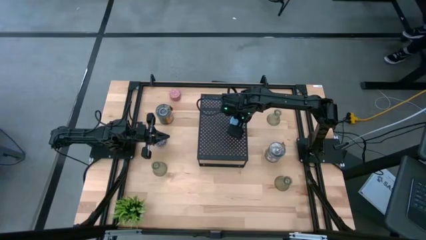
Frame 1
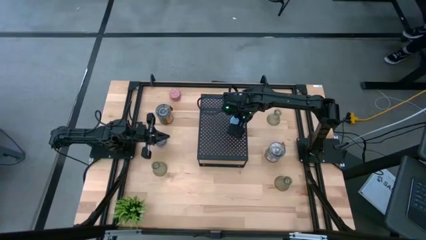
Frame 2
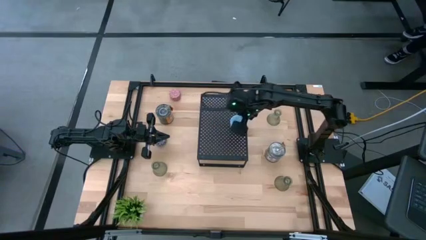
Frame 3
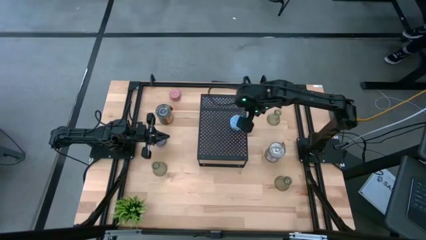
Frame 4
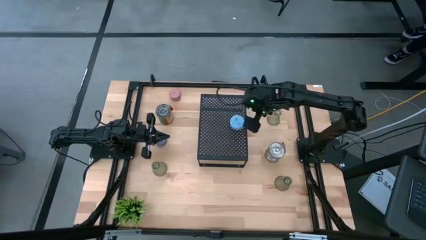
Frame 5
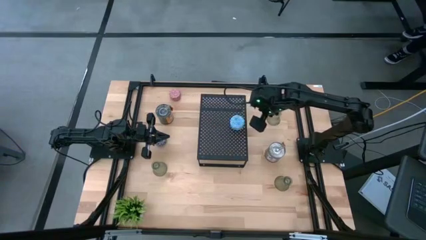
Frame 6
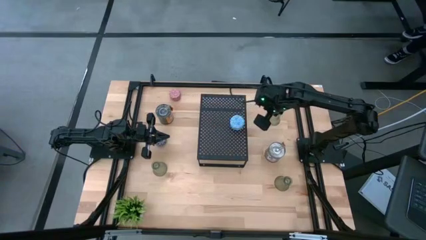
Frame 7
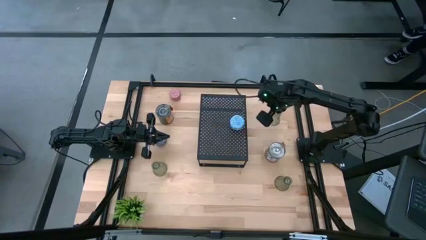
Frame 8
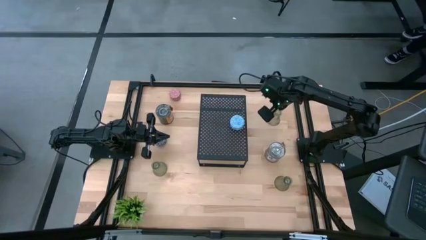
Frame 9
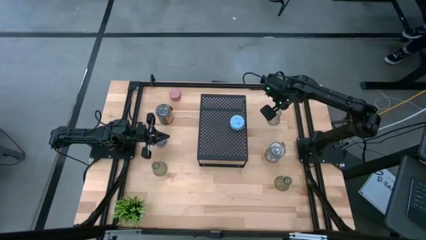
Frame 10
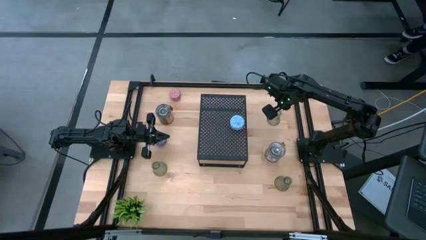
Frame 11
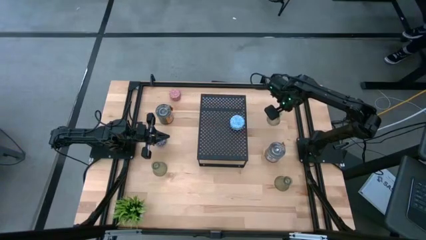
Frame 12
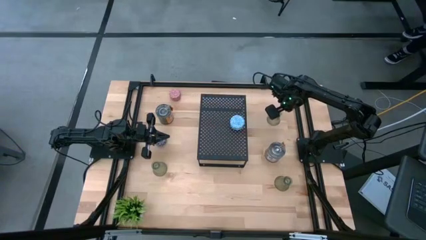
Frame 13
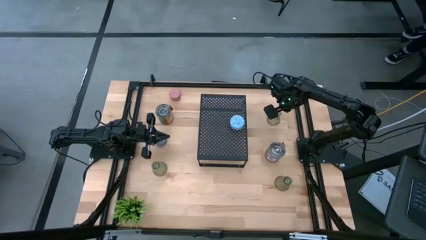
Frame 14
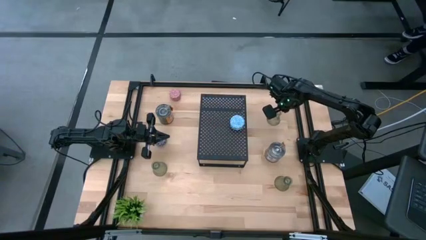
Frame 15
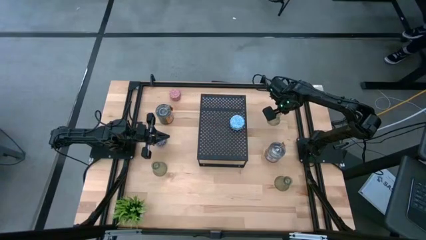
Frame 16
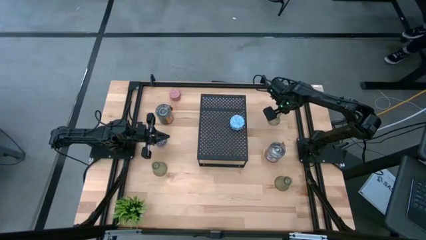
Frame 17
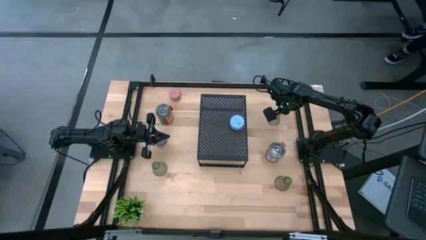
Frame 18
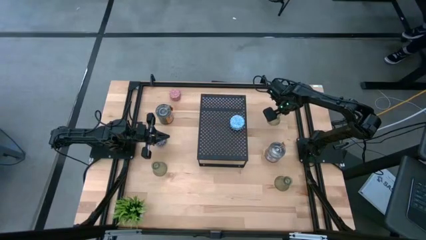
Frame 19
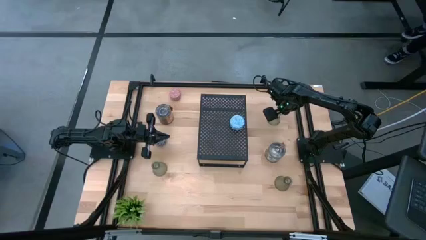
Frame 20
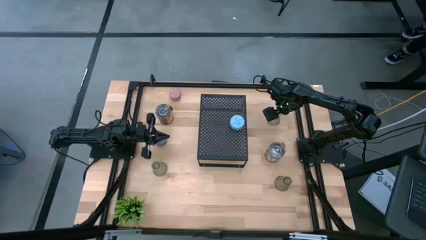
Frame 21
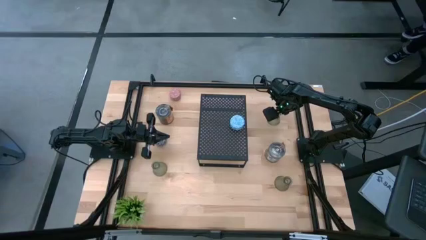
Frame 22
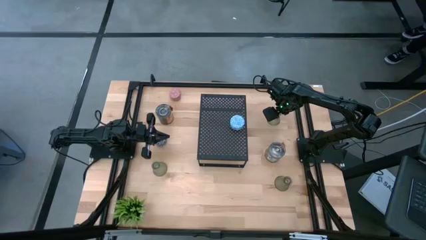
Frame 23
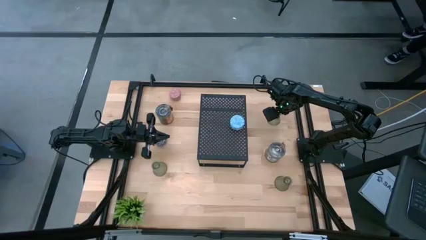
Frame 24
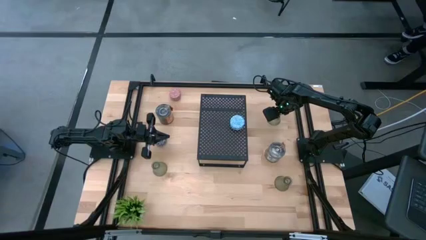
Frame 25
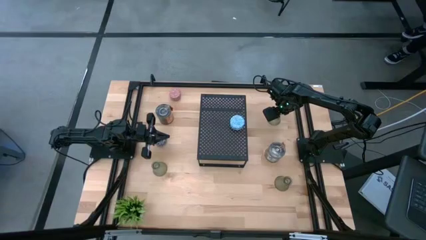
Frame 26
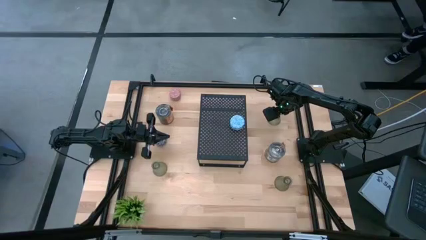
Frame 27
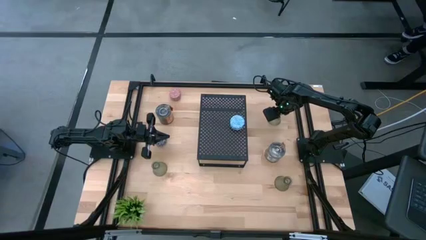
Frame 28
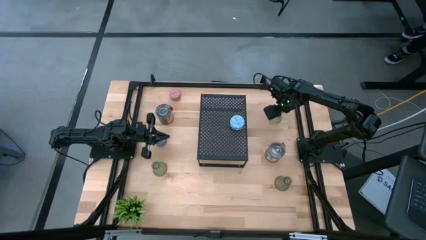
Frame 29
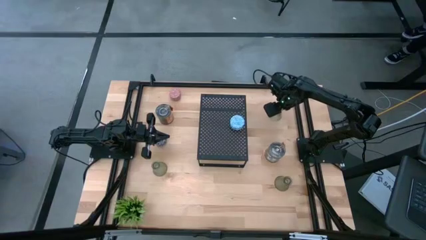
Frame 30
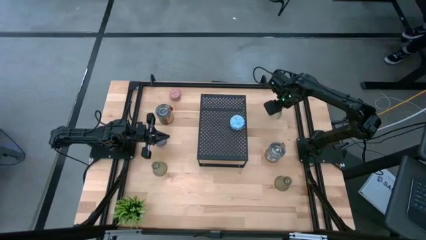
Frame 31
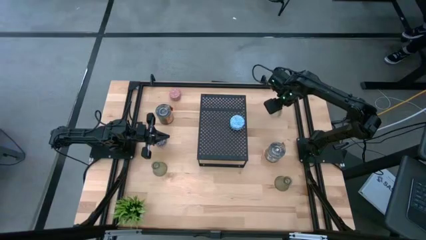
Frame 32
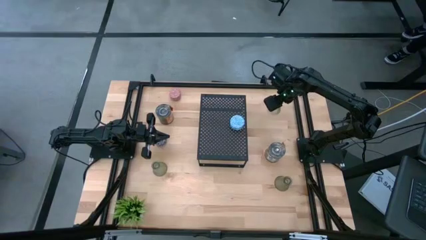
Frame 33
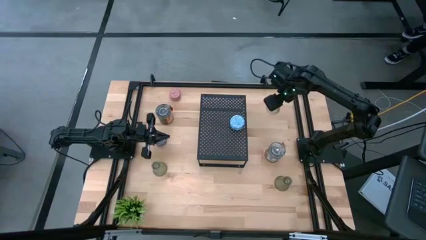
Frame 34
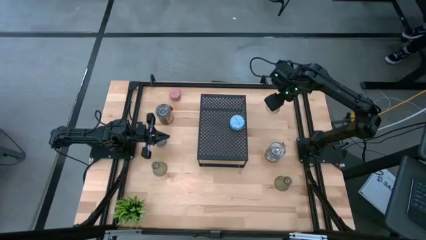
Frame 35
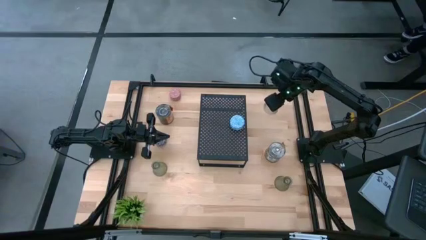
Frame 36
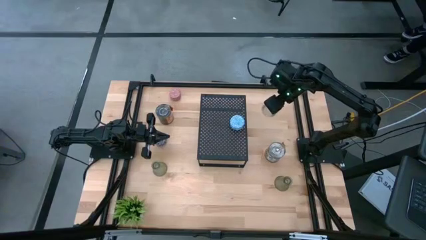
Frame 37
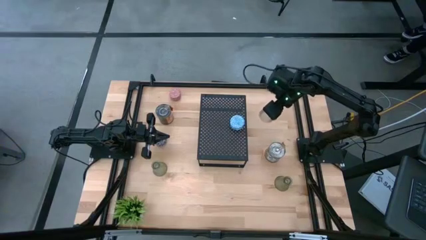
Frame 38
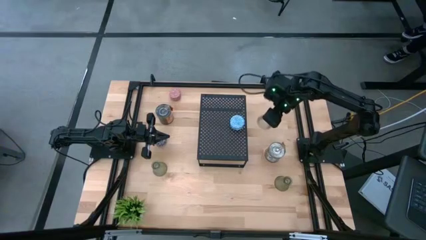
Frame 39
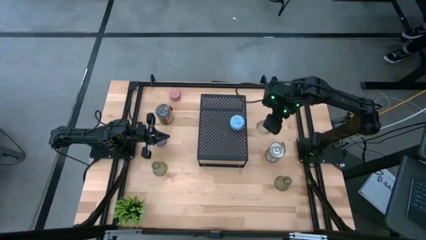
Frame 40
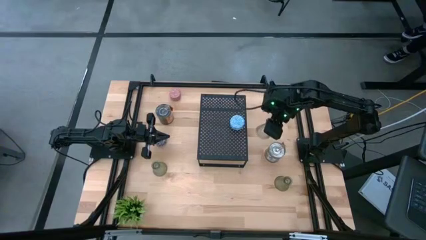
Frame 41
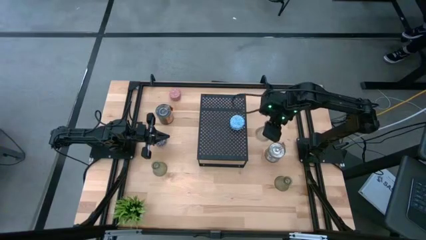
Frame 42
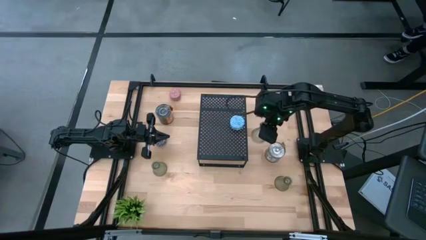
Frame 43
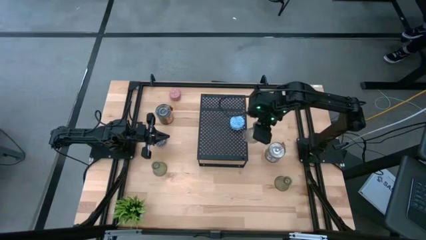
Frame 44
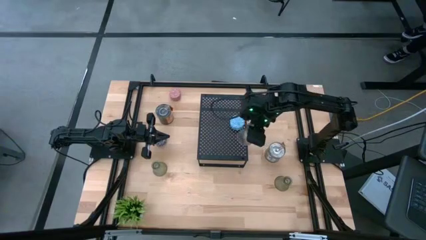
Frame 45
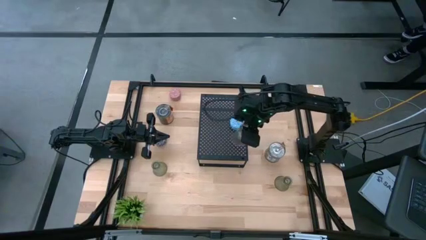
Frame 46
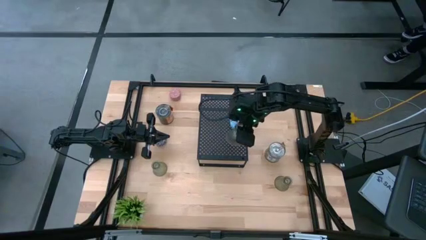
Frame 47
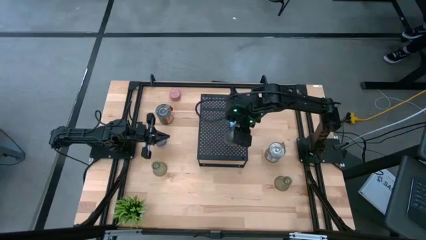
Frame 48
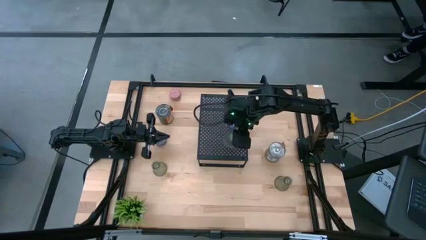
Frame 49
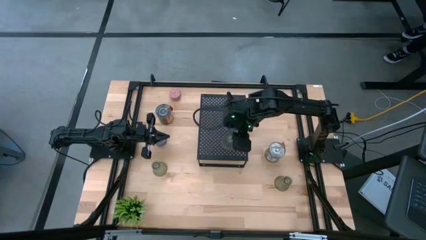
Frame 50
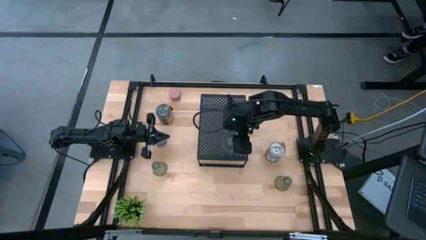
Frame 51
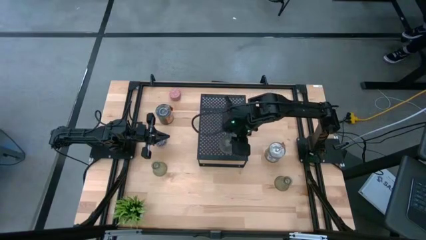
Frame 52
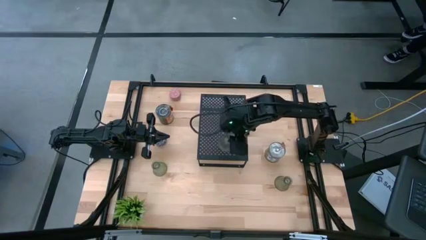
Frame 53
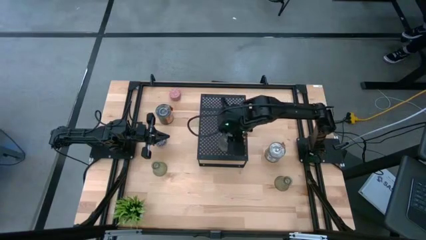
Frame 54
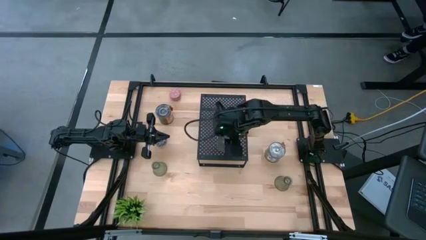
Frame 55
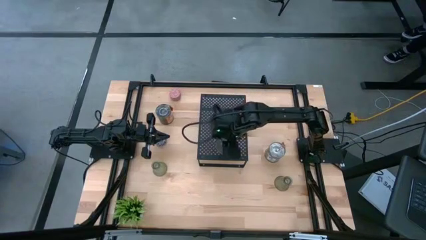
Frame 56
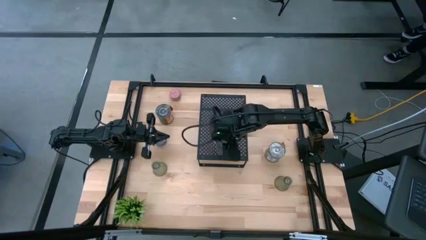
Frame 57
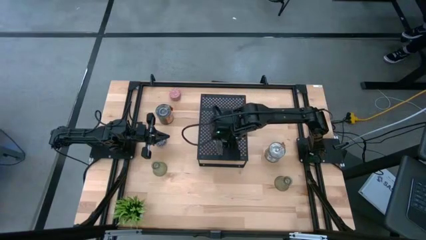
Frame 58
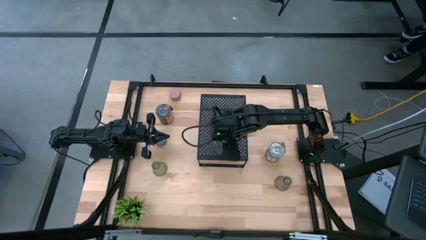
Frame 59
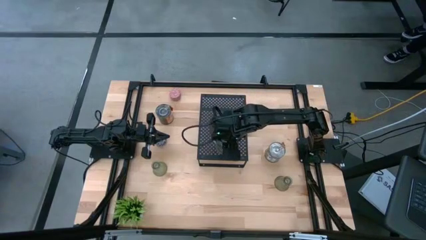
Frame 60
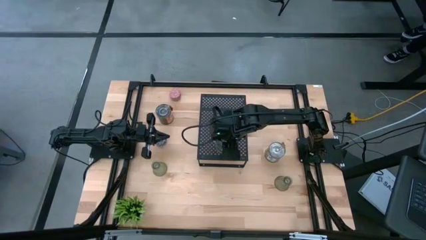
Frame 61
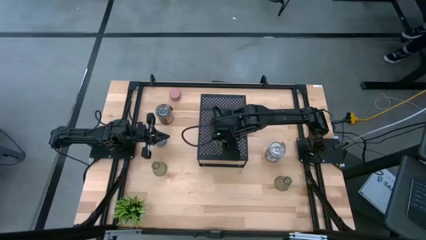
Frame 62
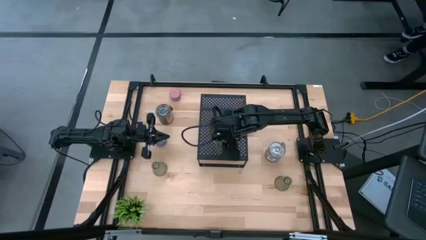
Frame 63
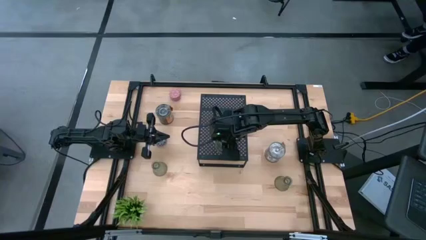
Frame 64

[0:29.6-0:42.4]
Task: Pick & Place candle stick holders
Put the top glass candle holder on the shelf
